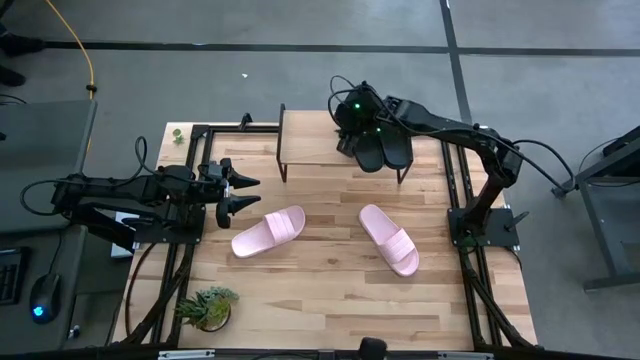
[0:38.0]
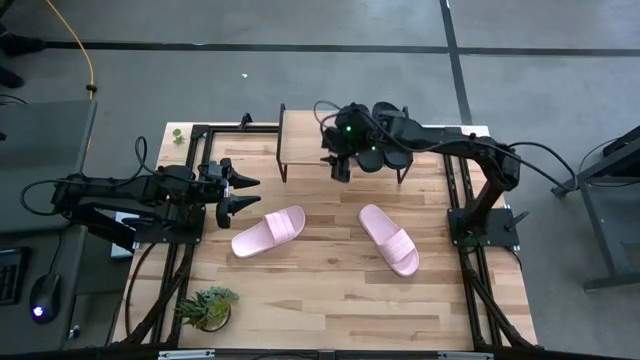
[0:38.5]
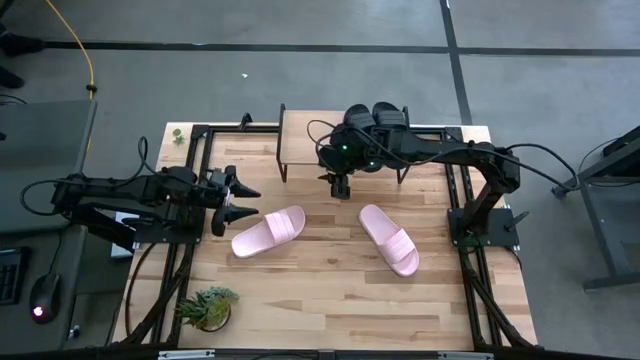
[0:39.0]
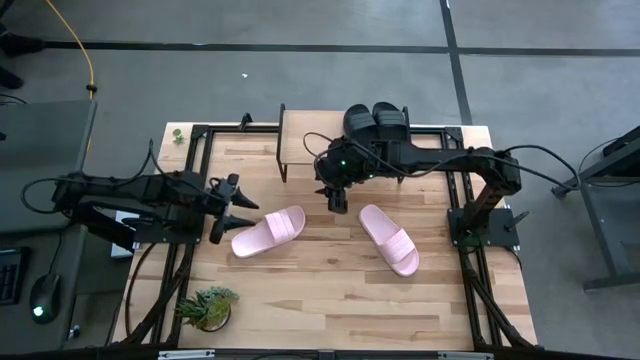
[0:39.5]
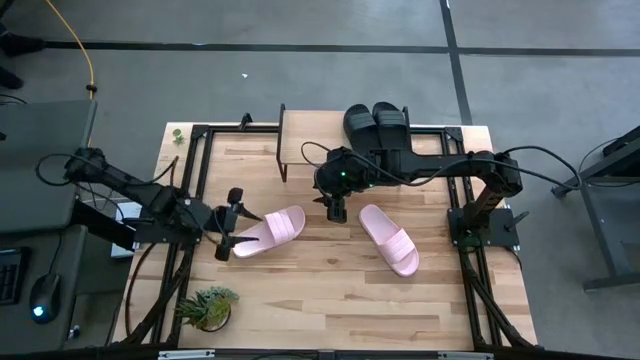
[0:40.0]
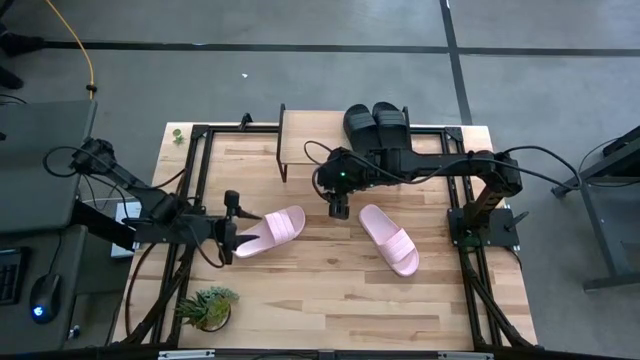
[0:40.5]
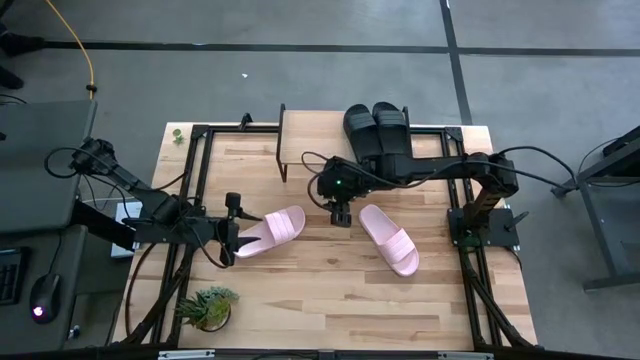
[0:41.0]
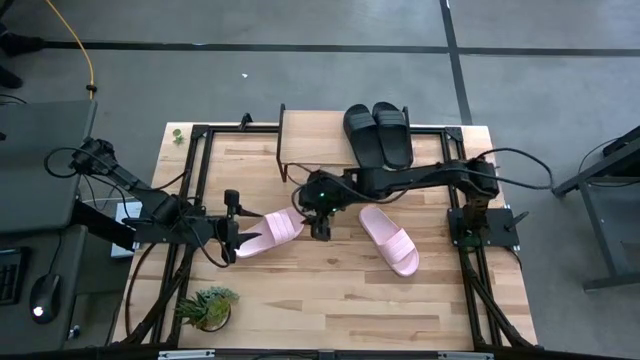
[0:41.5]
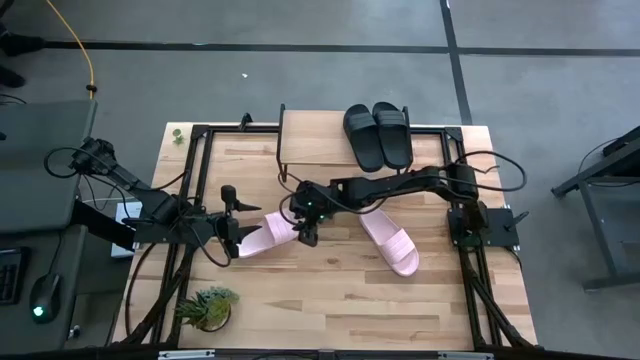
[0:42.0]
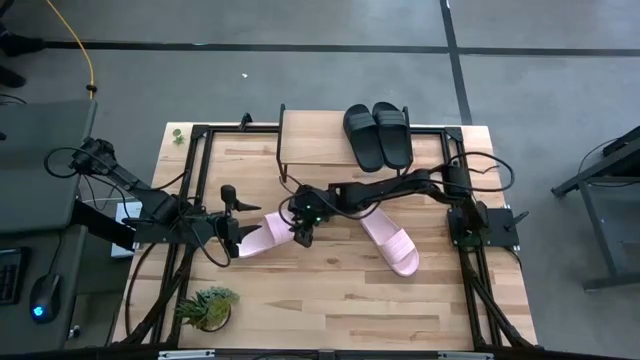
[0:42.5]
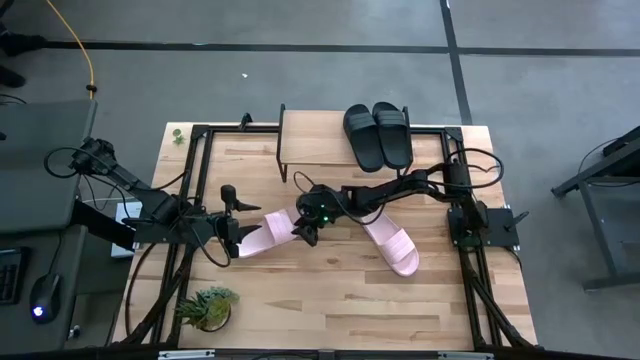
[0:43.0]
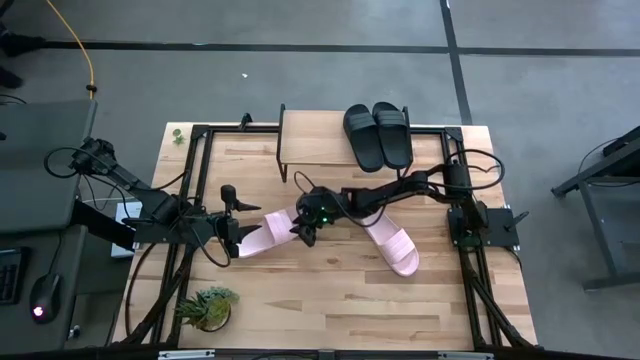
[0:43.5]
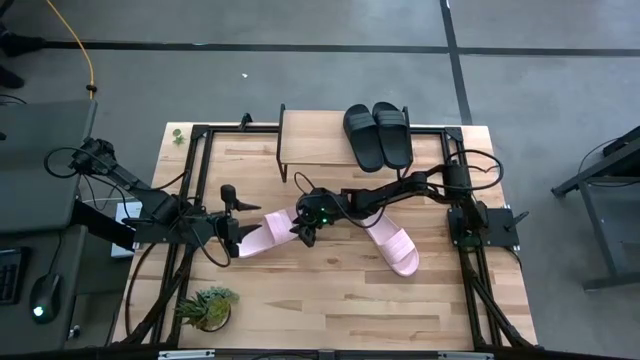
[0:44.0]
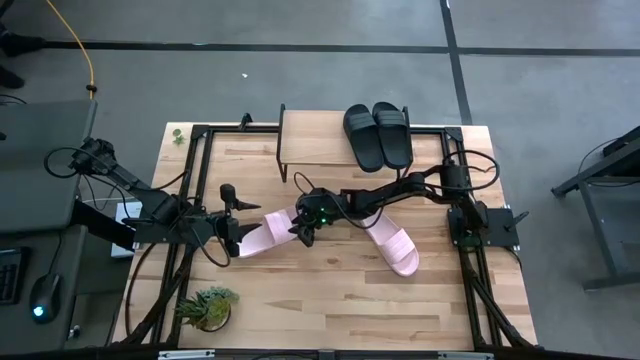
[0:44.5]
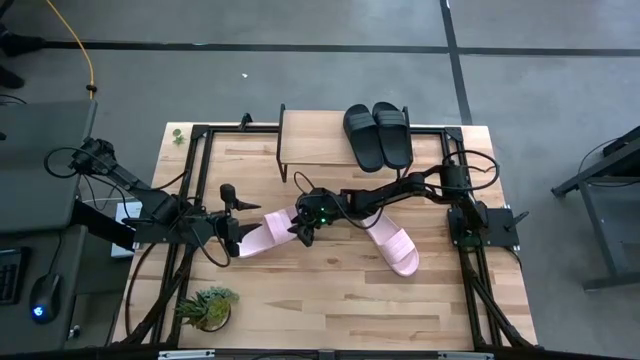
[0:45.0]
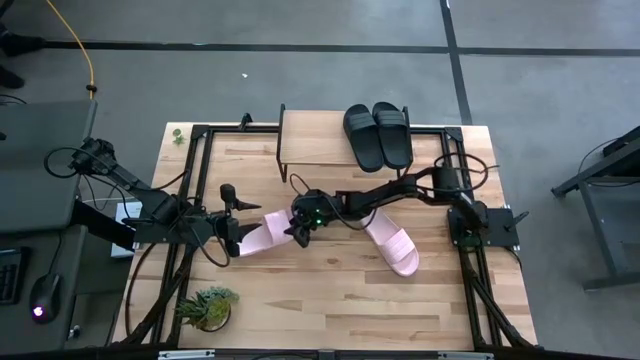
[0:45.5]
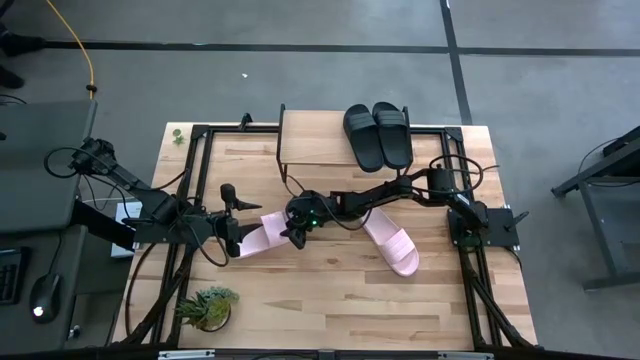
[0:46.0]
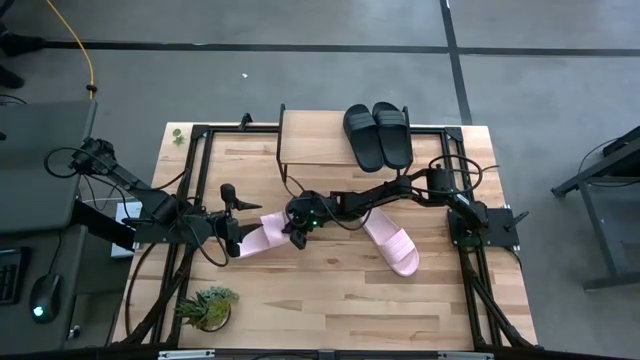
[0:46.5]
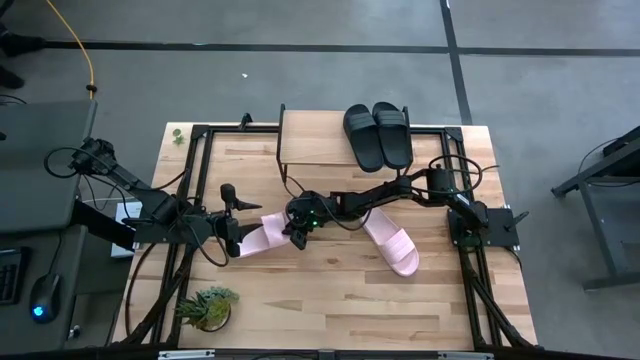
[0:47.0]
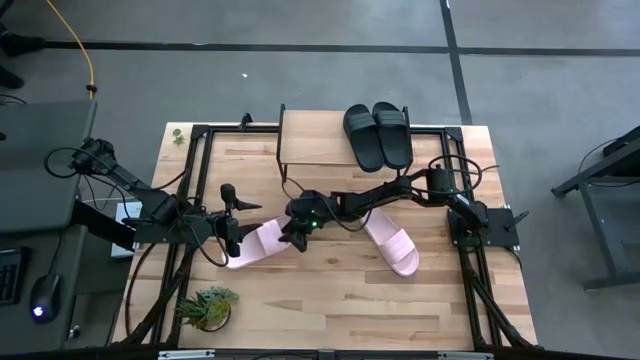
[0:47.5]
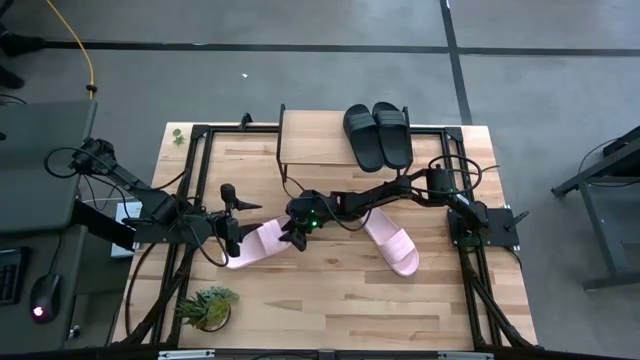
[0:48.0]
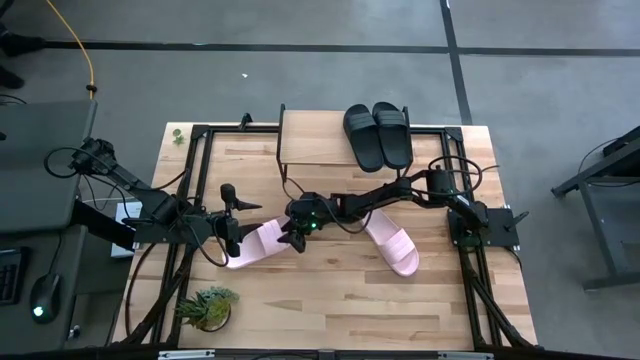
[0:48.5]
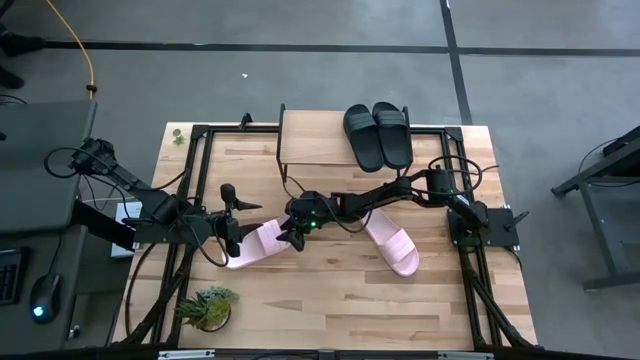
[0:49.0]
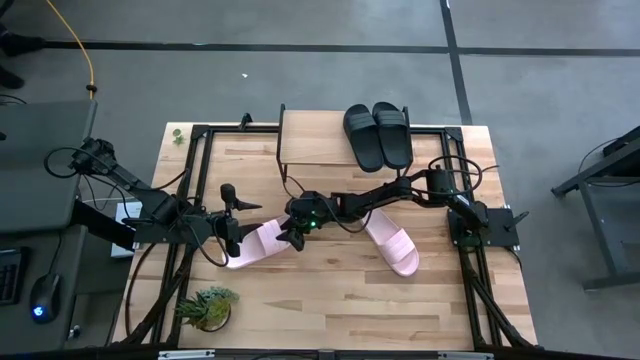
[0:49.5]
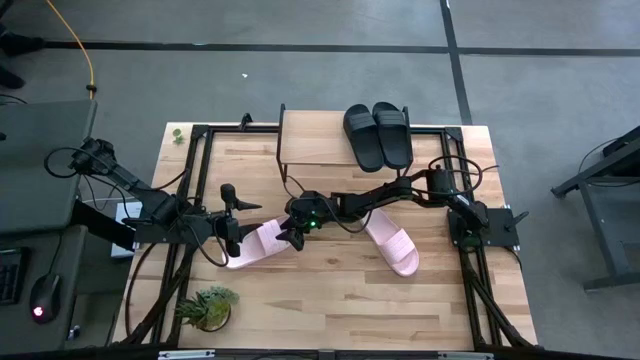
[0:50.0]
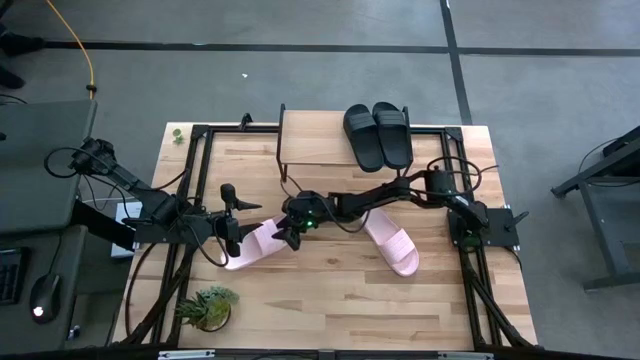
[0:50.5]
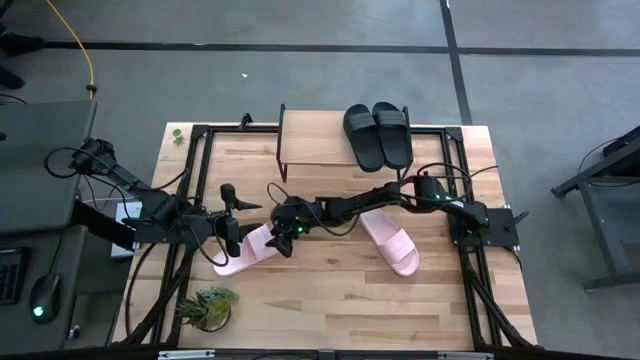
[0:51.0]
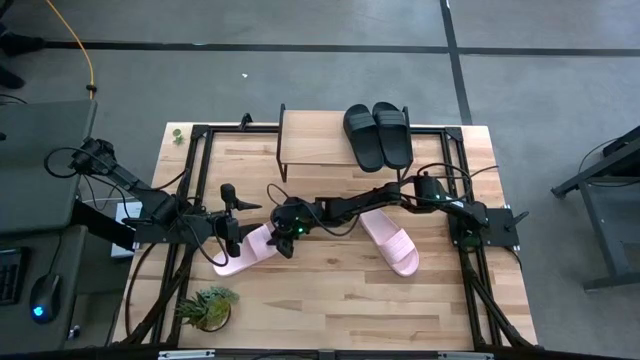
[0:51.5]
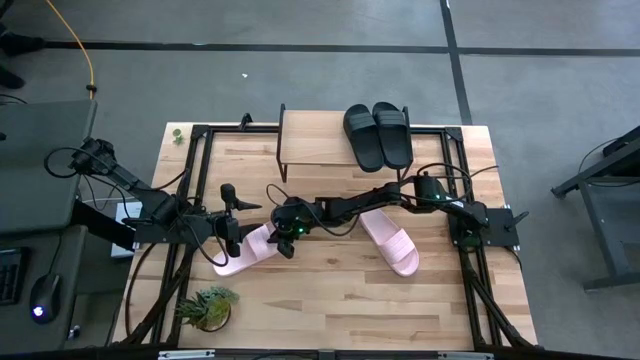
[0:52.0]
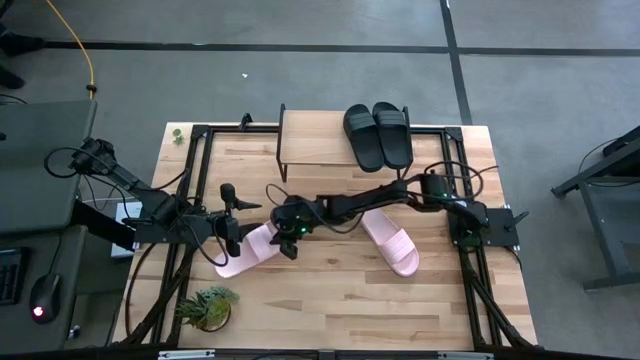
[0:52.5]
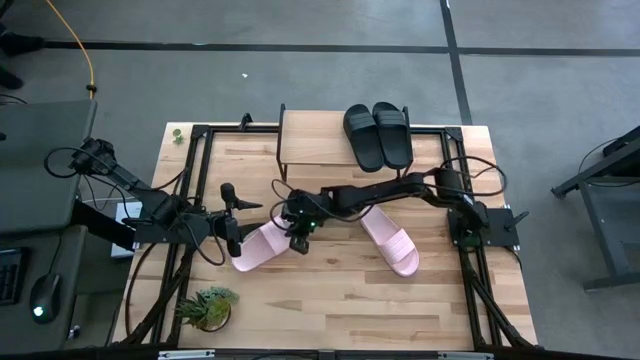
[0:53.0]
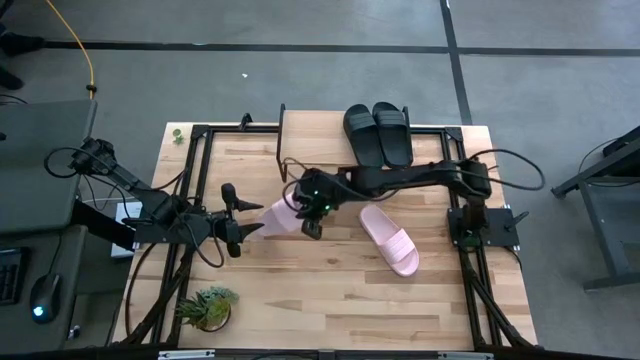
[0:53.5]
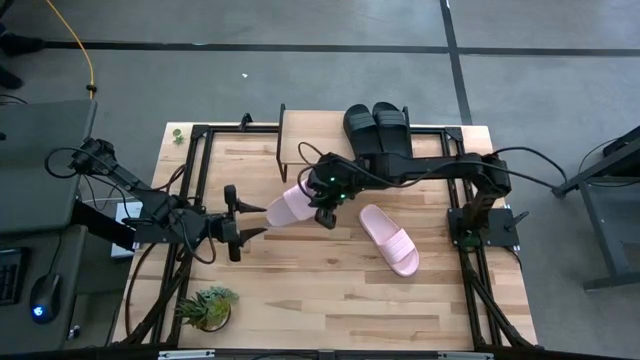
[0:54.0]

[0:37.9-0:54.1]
Task: Pick and place slides into the shelf
Put the left pink slide on the shelf
